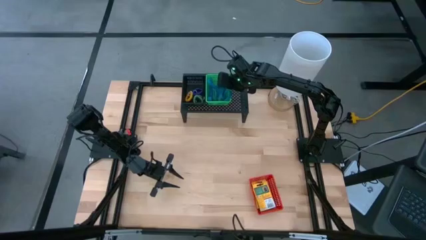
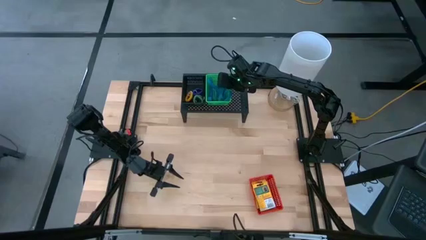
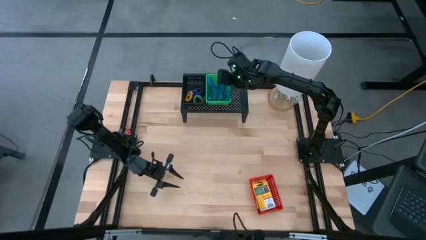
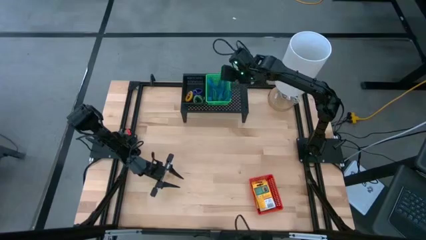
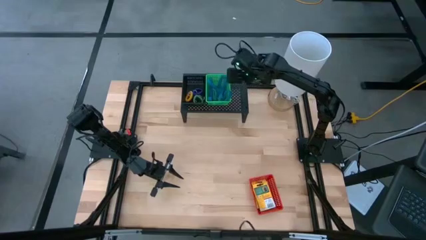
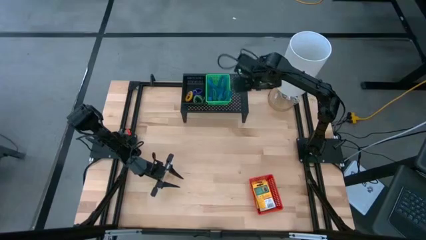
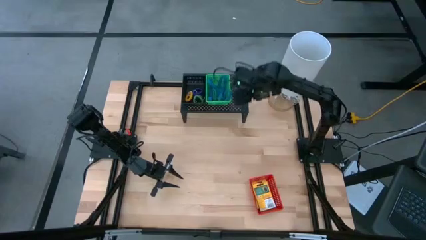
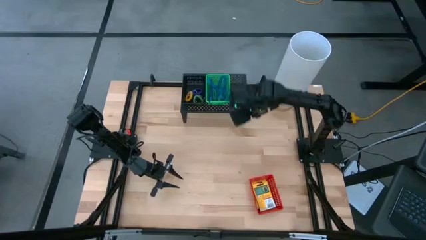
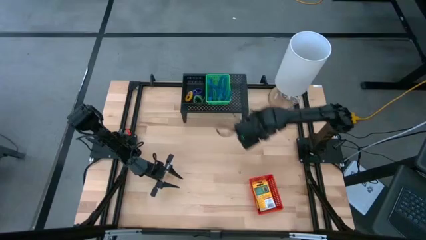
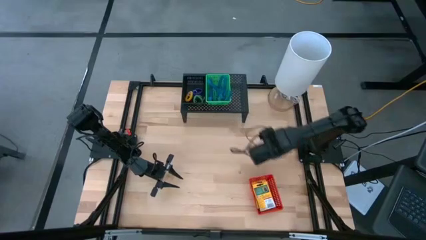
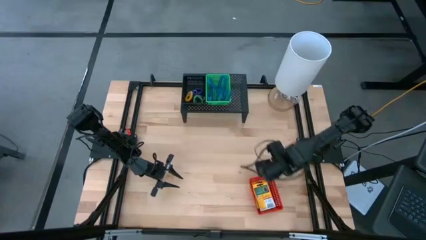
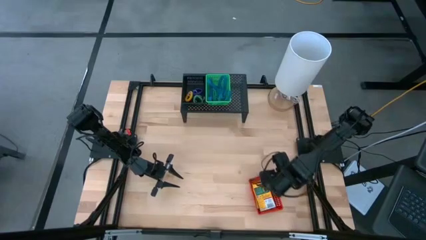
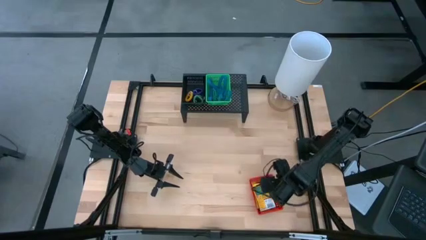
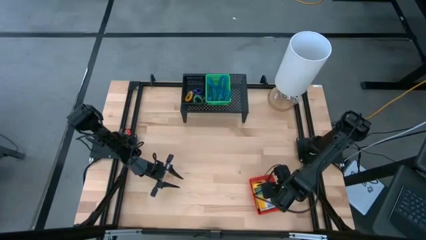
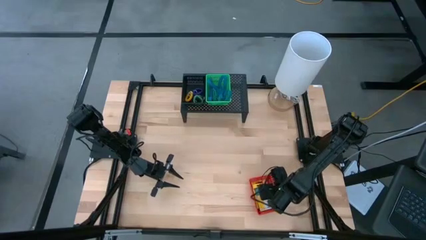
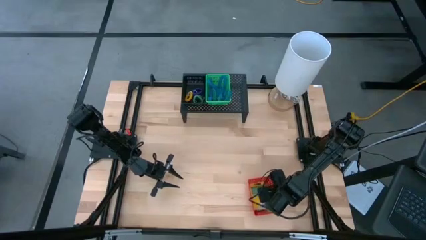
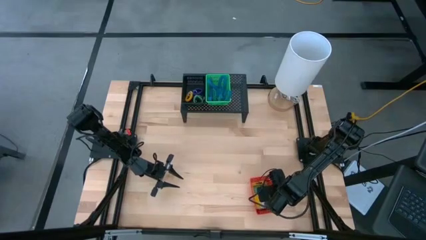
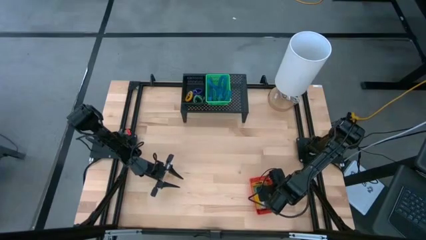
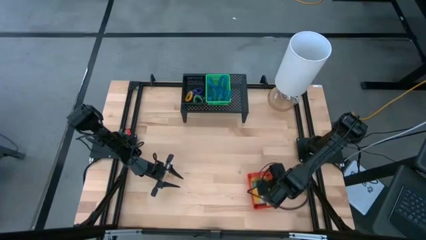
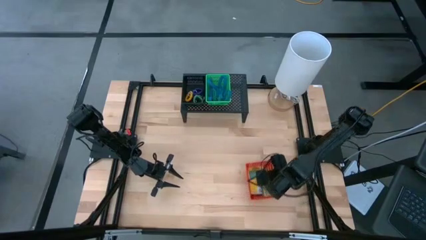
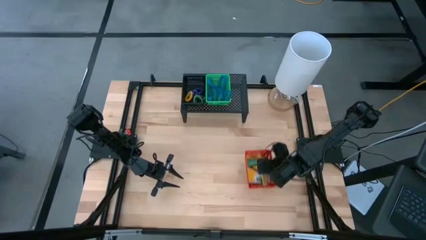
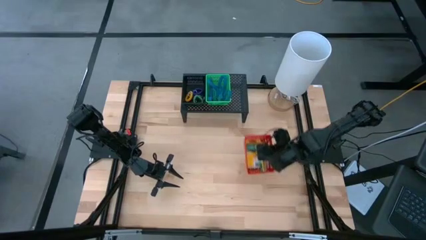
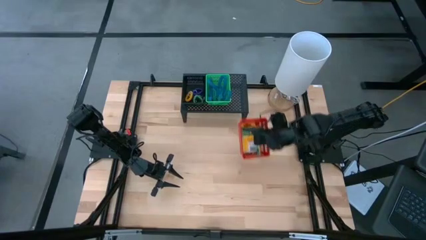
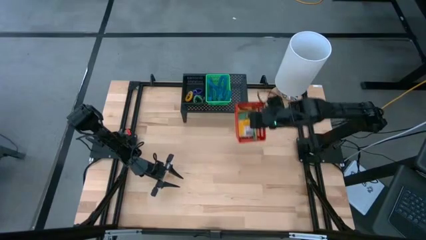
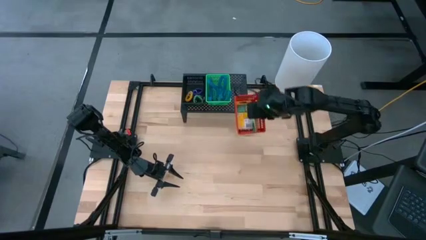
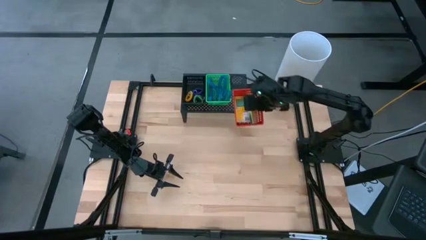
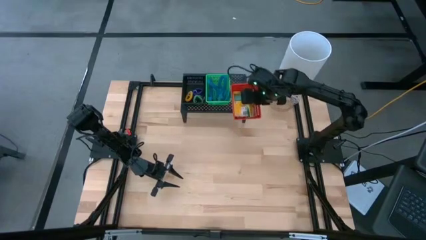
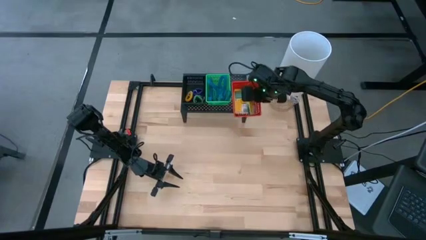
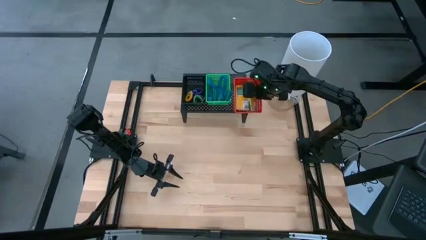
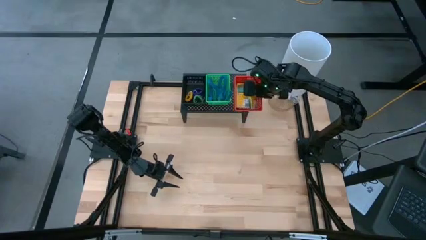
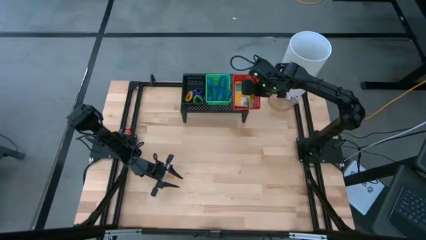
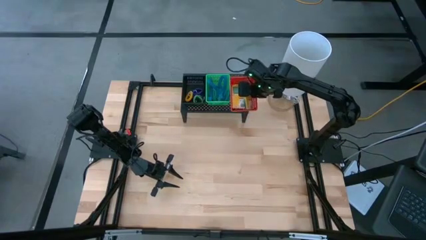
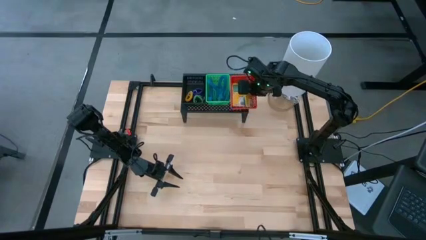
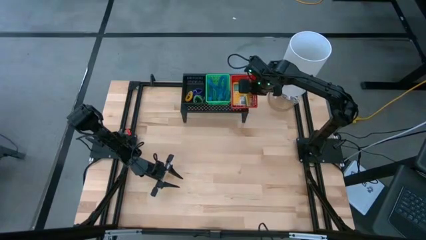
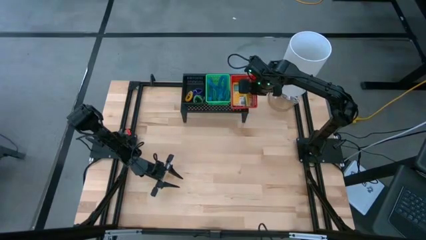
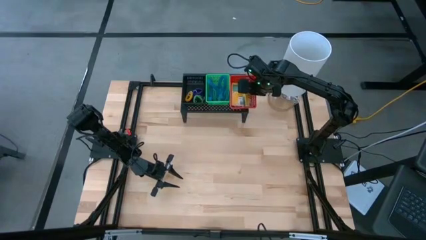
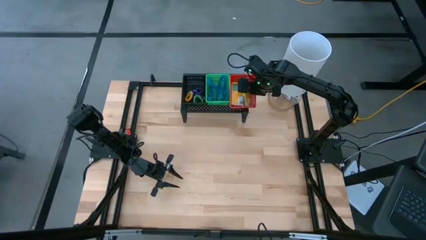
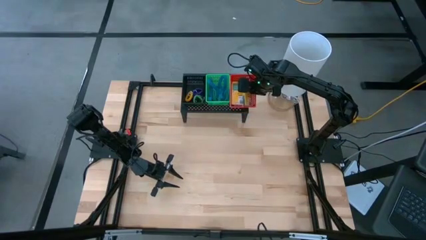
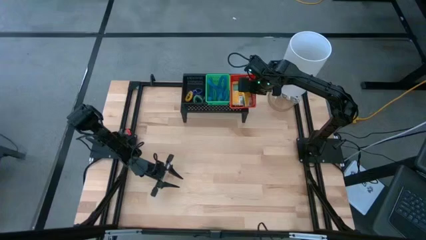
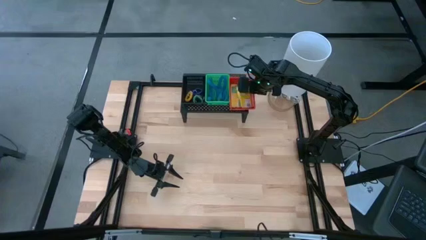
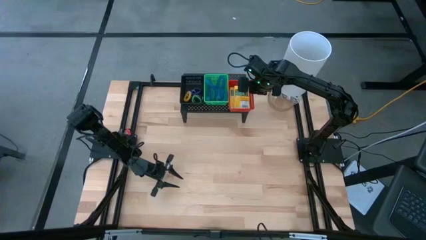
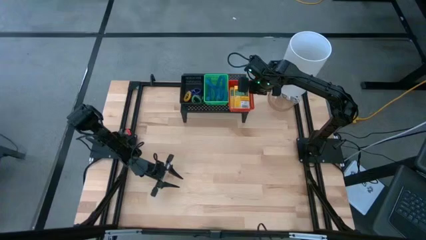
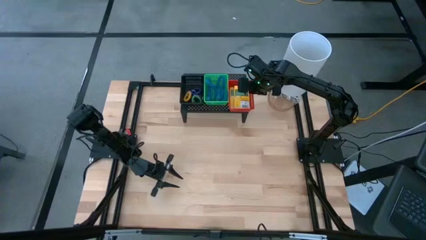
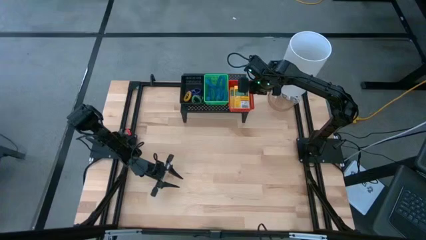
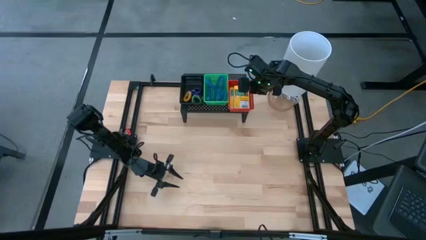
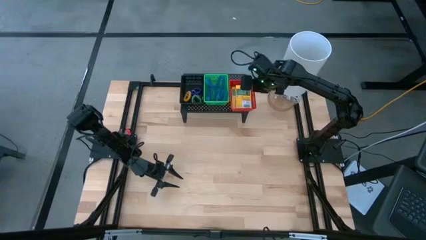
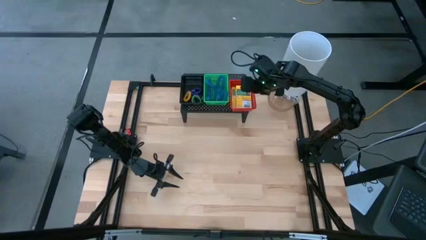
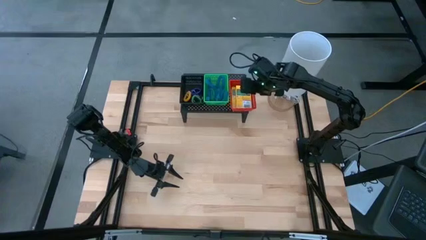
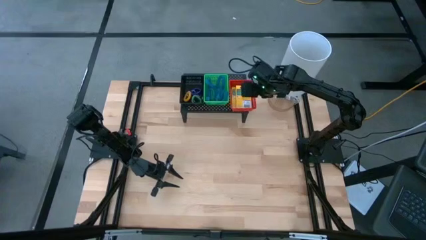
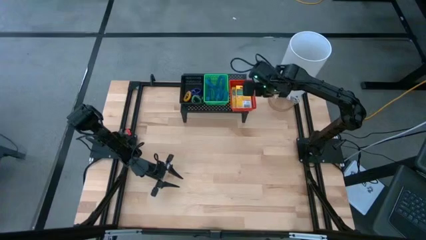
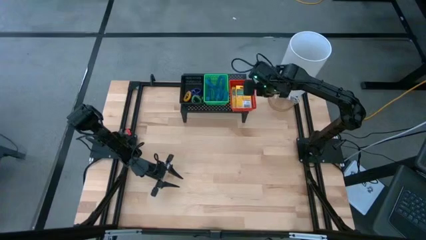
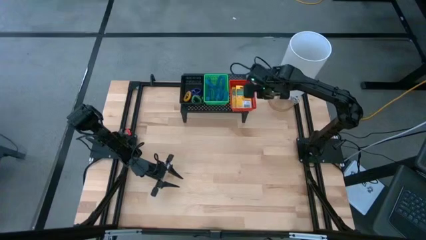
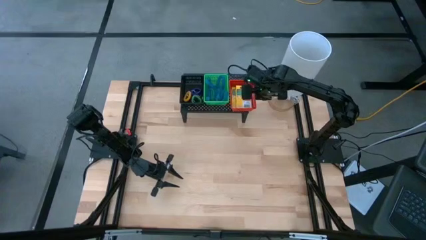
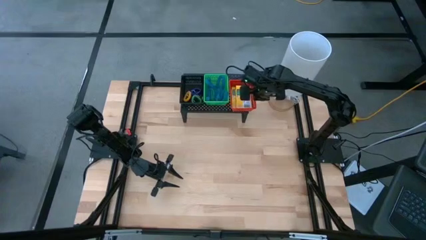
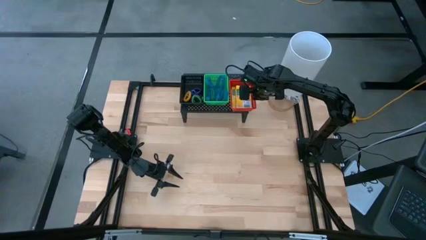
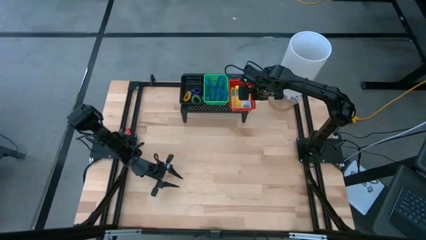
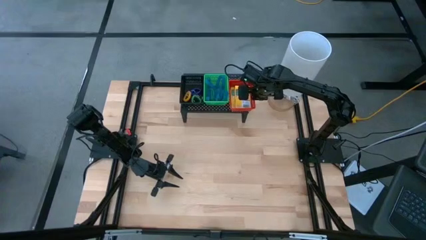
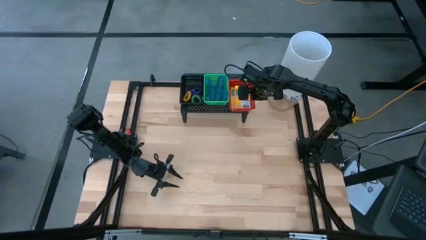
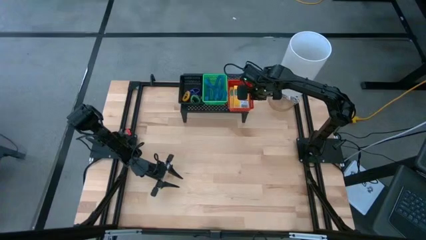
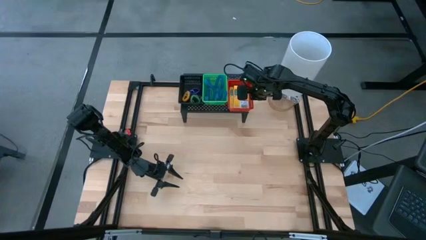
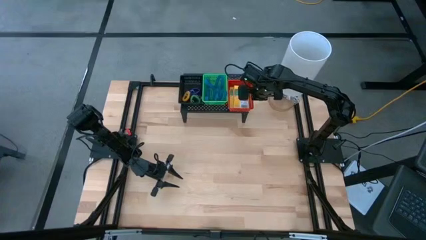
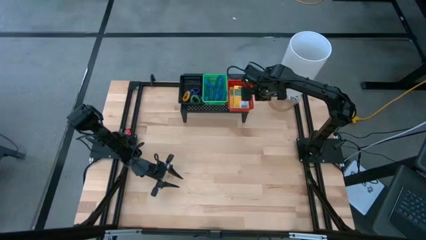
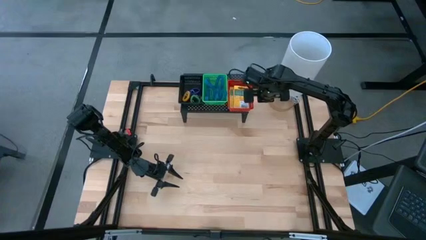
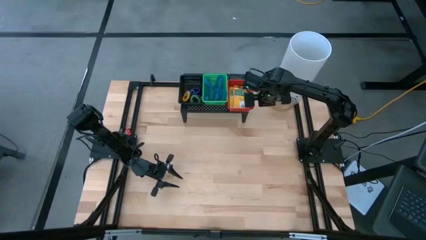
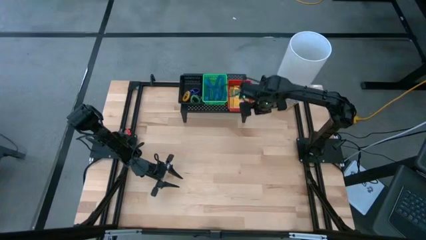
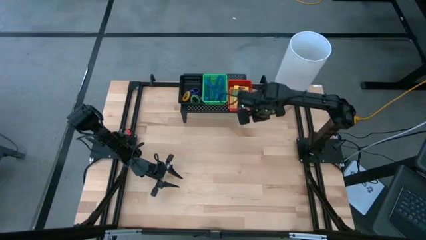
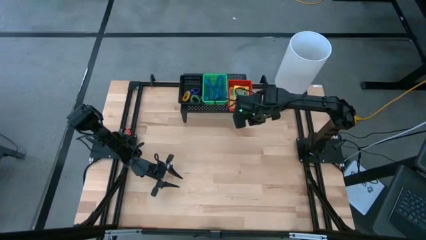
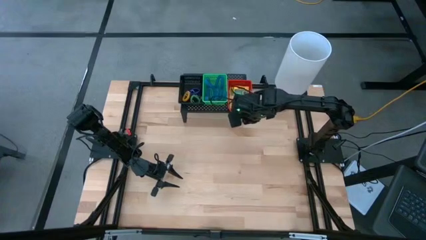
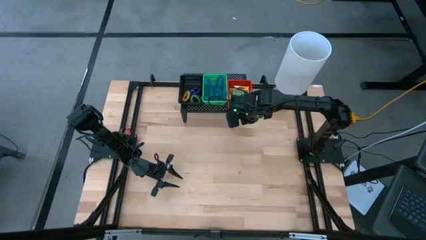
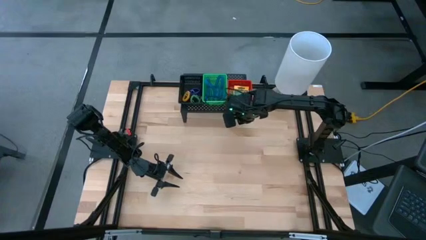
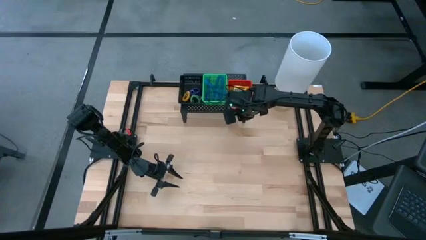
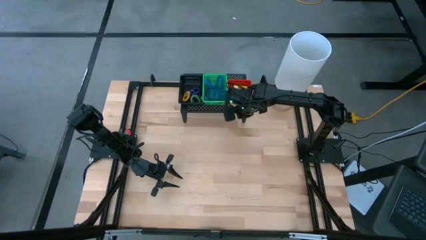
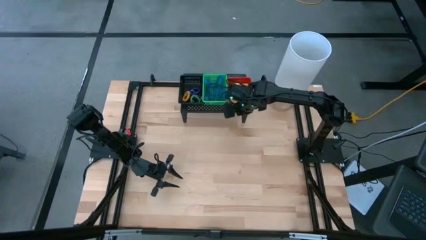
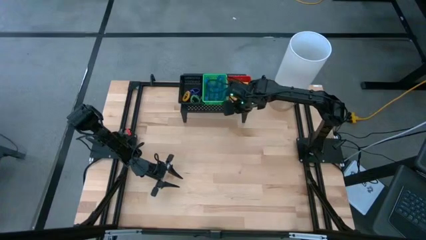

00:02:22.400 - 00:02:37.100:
Task: Pick & Place Office Desk Supplies
Put the red basket on the shelf

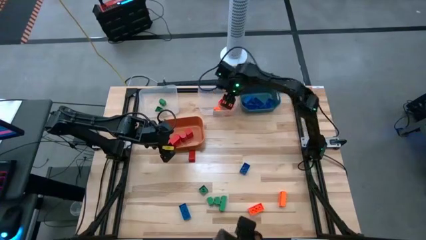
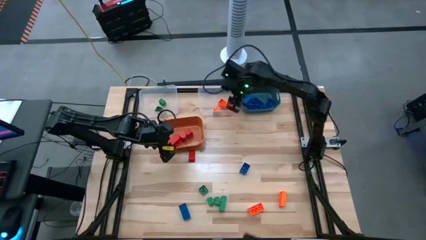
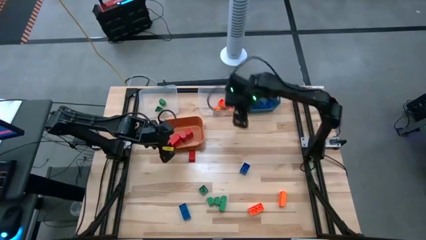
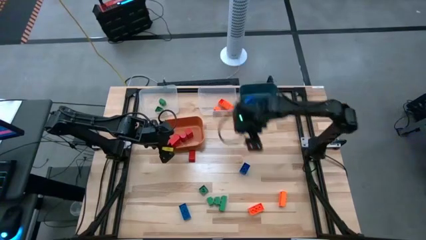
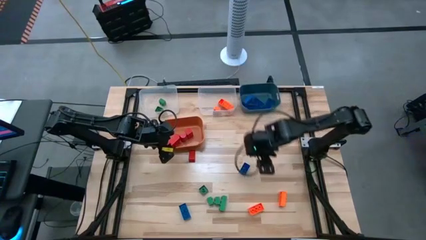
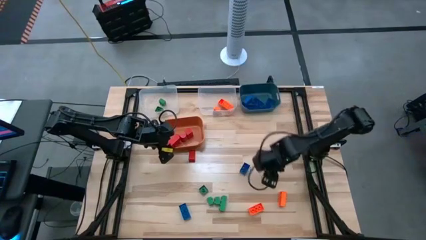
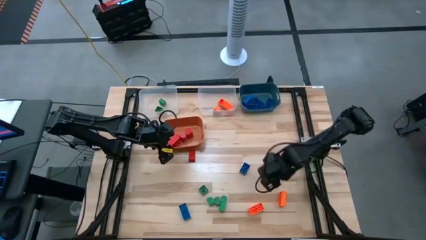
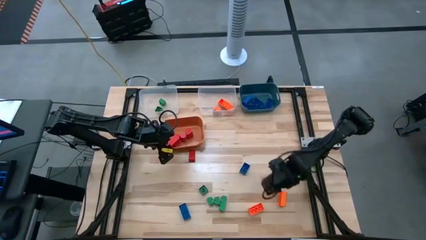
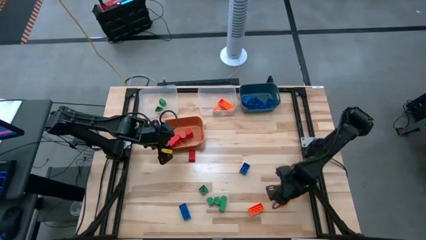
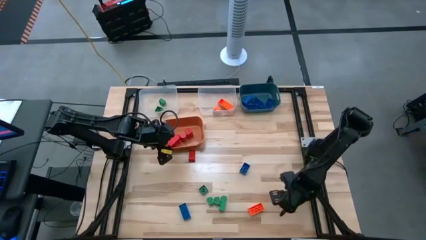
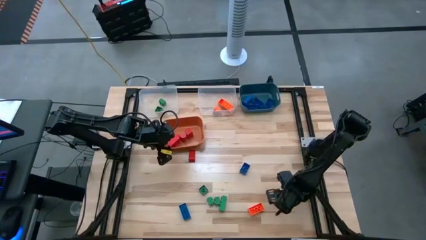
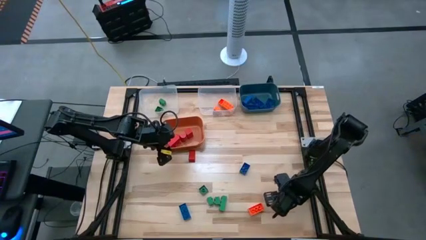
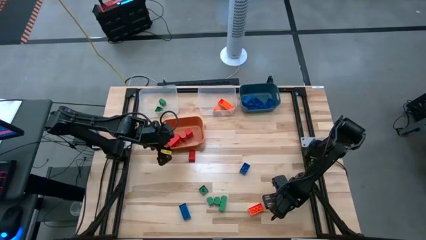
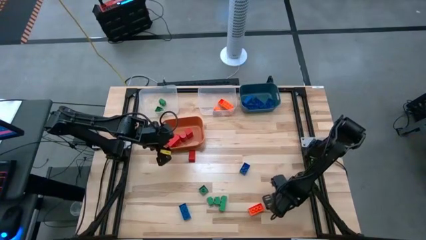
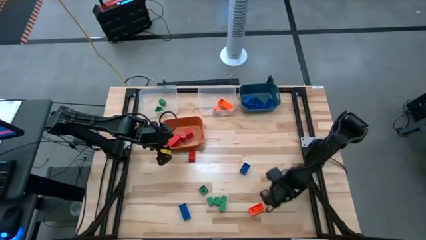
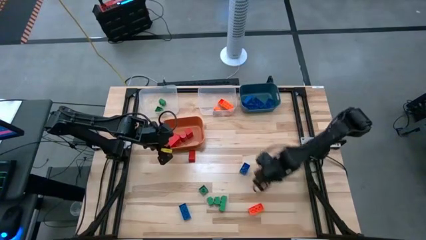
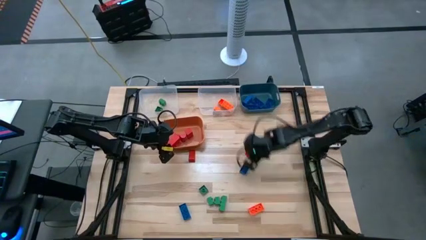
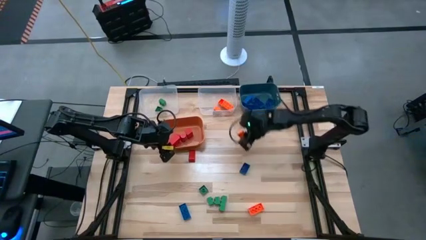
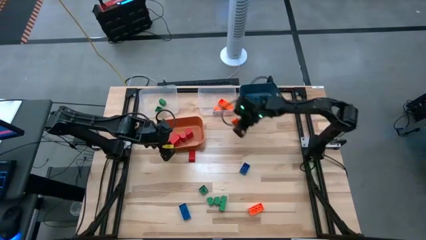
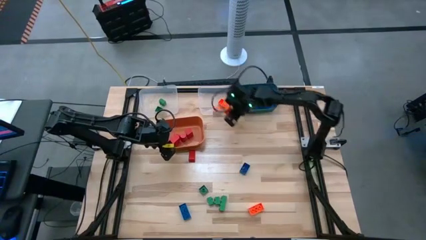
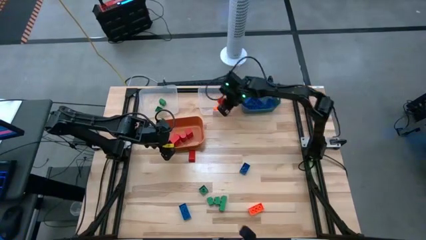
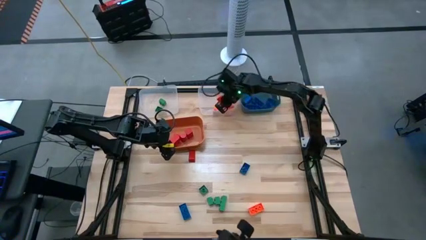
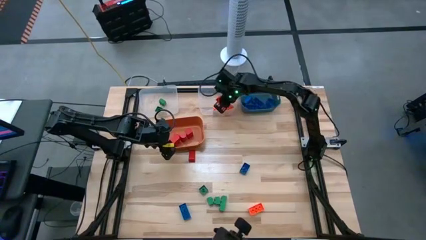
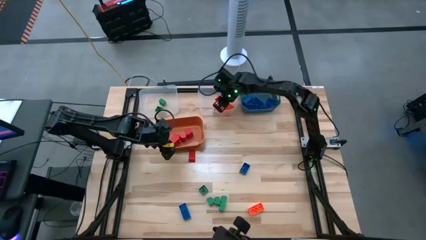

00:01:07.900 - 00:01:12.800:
Task: Sort blocks
Put the orange game piece into the transparent bin
